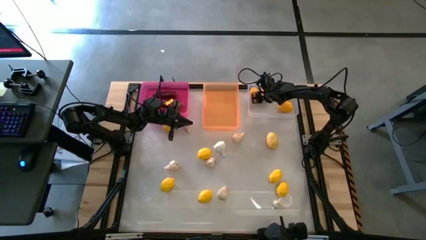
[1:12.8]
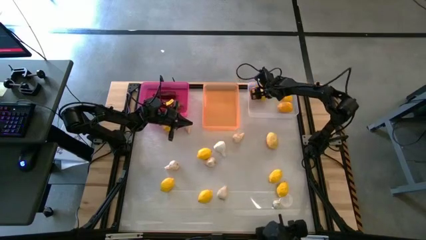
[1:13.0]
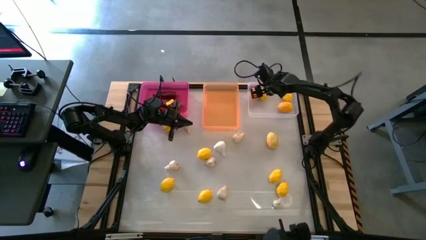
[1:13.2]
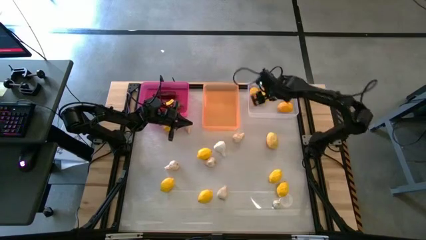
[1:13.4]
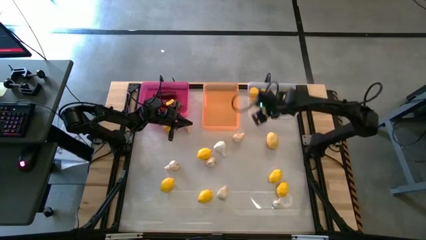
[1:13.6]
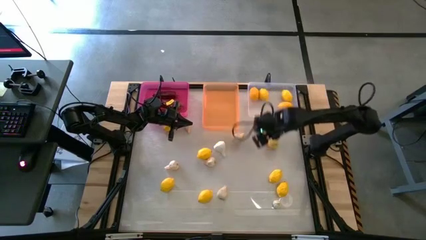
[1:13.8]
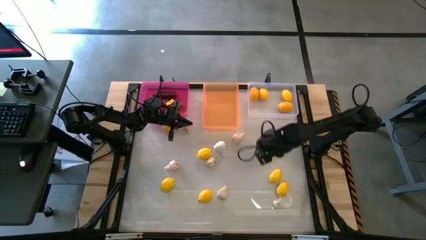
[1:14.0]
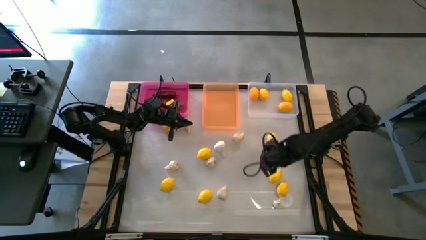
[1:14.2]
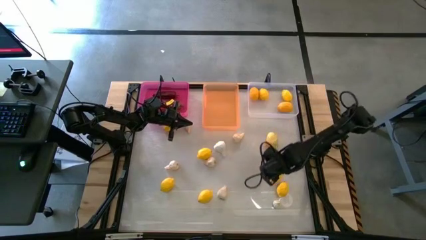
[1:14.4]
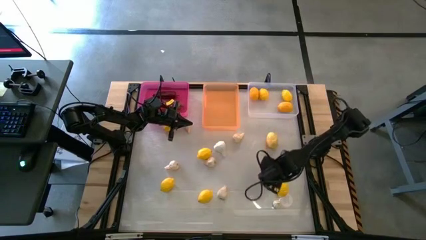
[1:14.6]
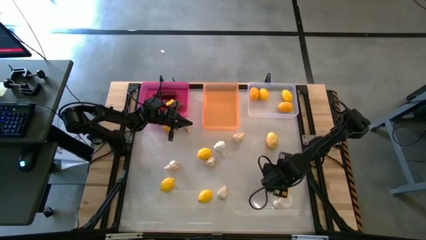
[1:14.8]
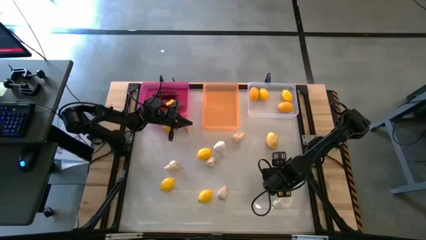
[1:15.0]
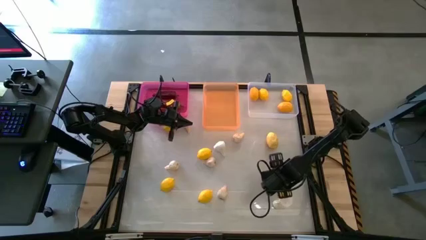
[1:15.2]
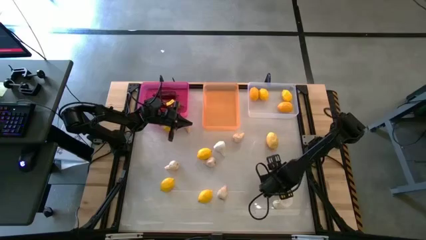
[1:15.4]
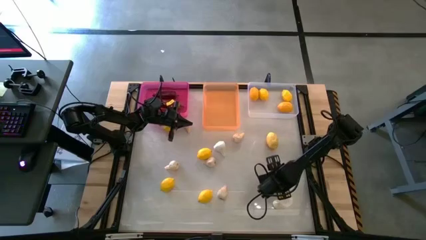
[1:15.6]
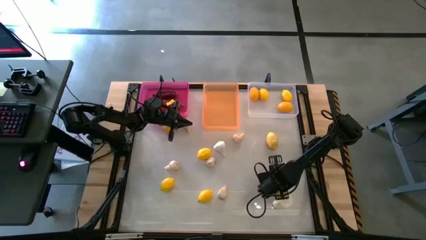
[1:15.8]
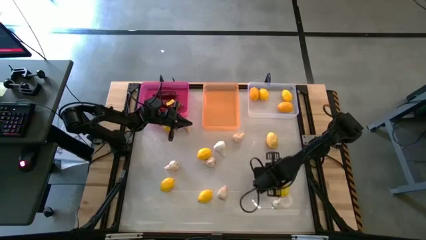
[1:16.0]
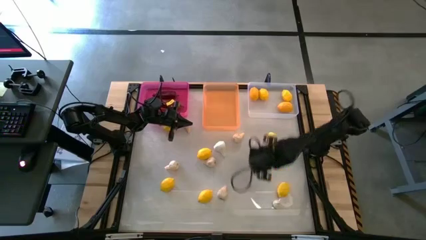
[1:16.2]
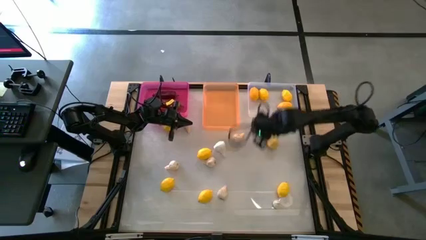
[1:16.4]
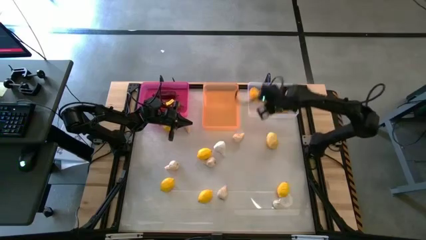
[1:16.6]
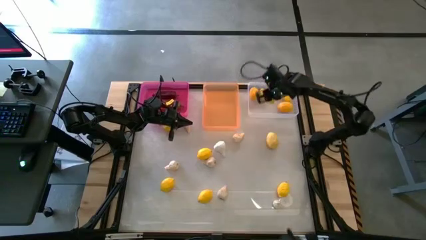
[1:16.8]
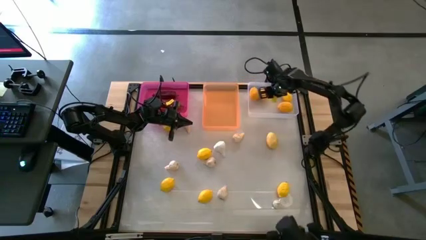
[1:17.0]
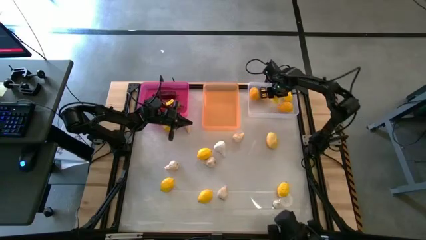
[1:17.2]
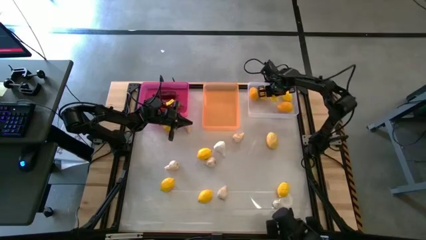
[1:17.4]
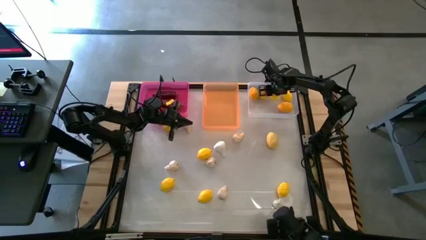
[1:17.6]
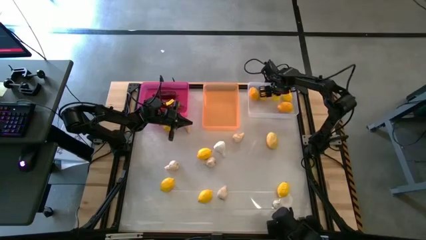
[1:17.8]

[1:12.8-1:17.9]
Task: Sort produce into baskets
Put the yellow lemon into the transparent bin

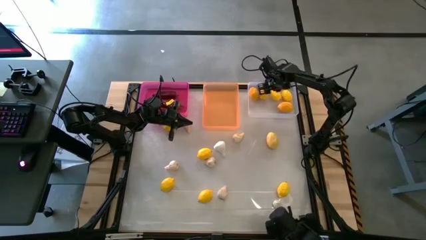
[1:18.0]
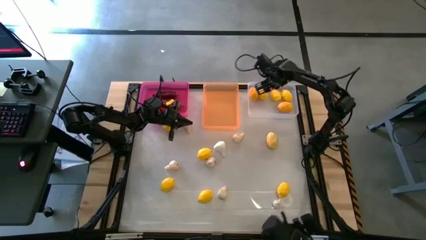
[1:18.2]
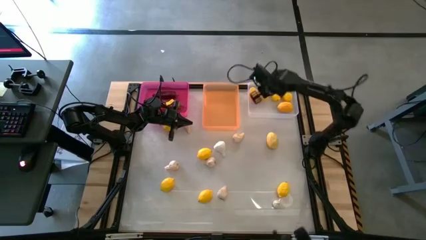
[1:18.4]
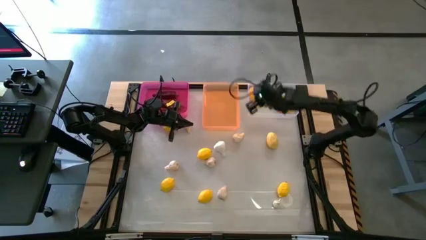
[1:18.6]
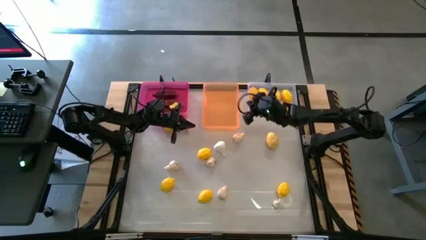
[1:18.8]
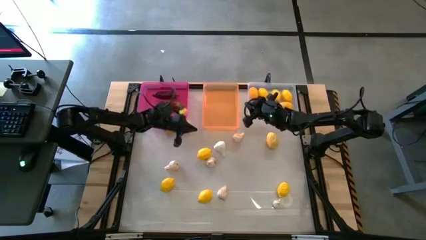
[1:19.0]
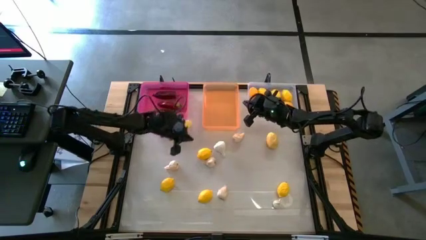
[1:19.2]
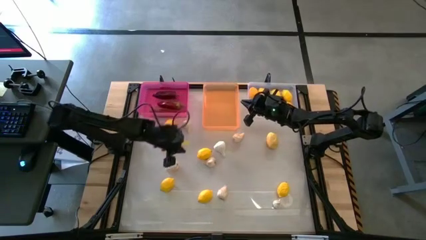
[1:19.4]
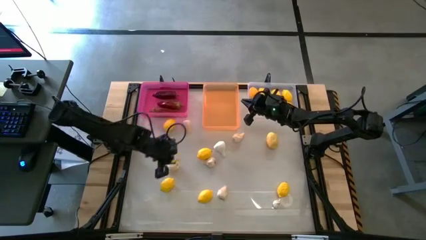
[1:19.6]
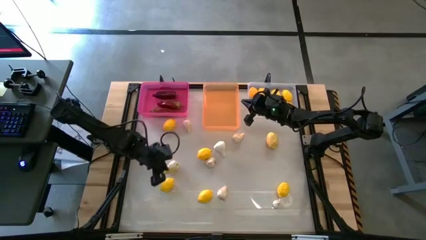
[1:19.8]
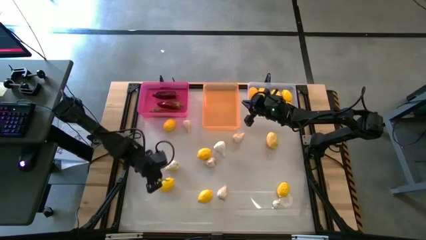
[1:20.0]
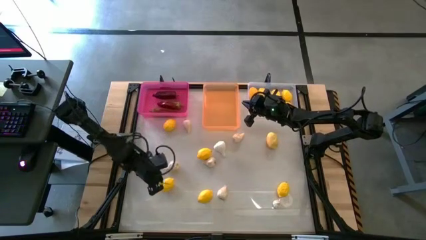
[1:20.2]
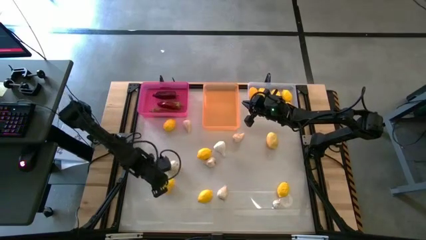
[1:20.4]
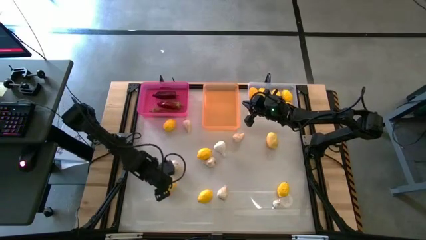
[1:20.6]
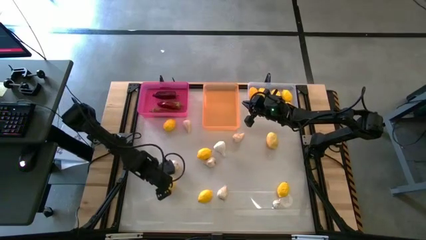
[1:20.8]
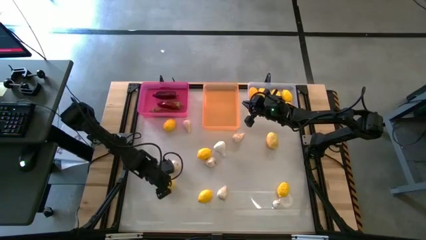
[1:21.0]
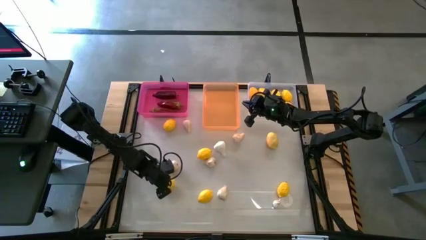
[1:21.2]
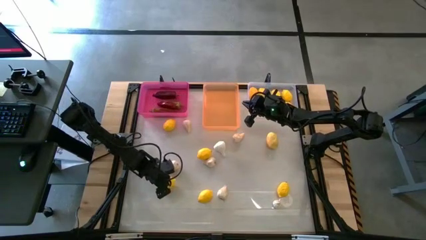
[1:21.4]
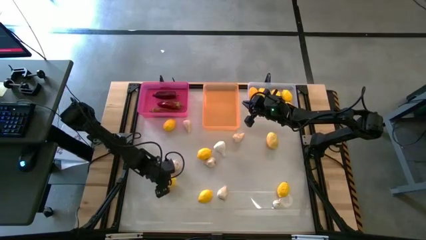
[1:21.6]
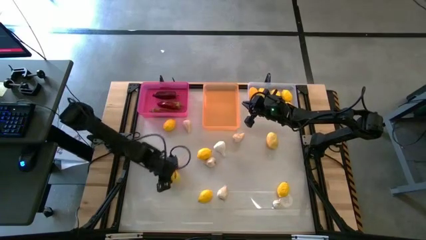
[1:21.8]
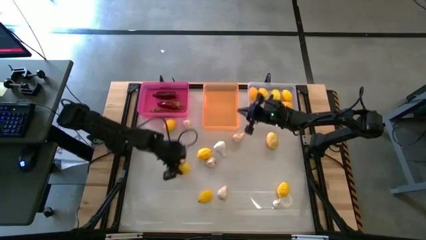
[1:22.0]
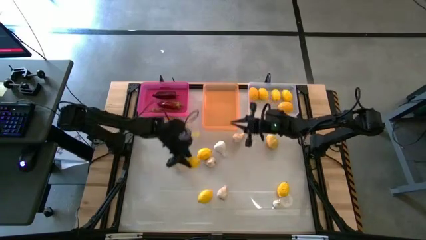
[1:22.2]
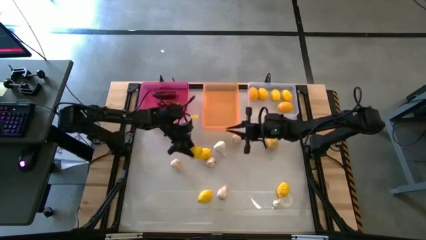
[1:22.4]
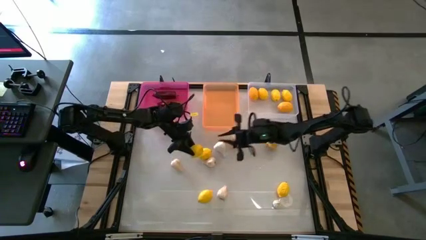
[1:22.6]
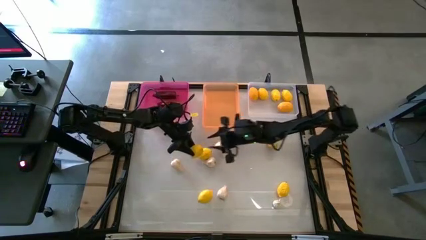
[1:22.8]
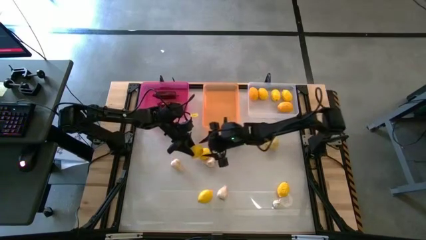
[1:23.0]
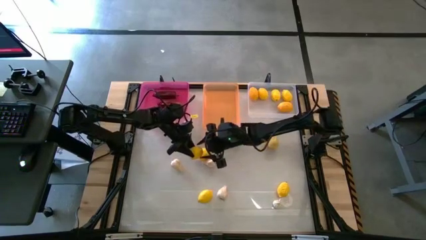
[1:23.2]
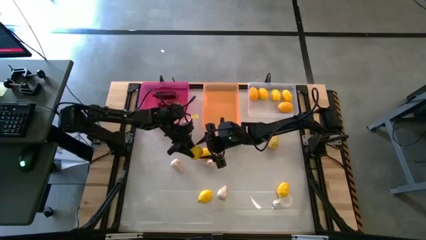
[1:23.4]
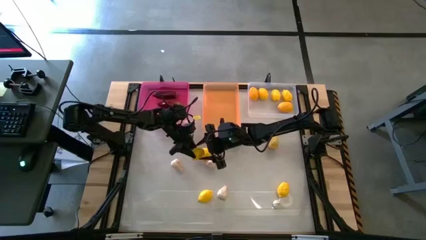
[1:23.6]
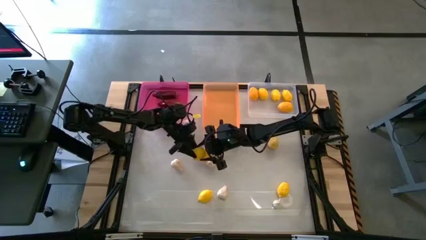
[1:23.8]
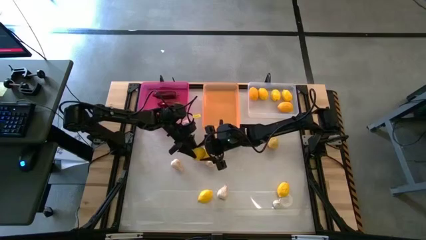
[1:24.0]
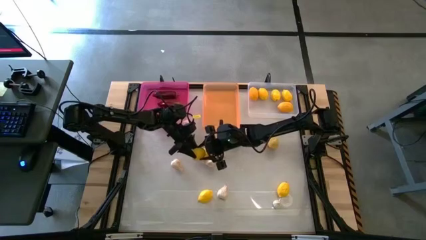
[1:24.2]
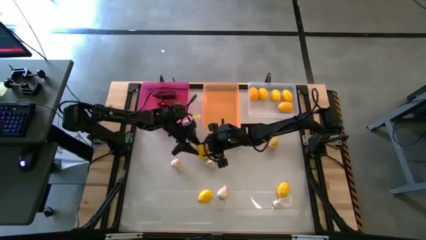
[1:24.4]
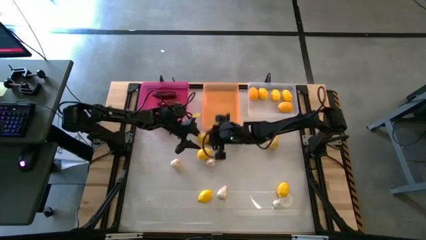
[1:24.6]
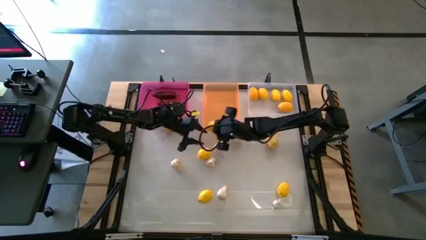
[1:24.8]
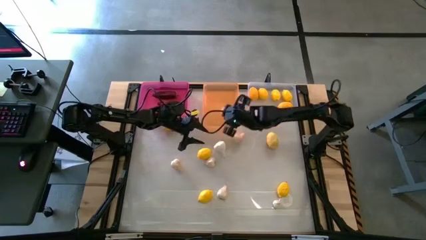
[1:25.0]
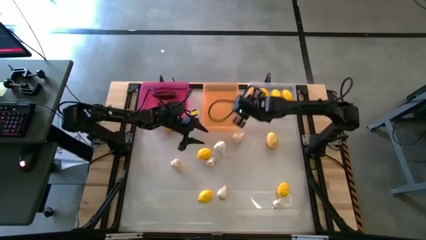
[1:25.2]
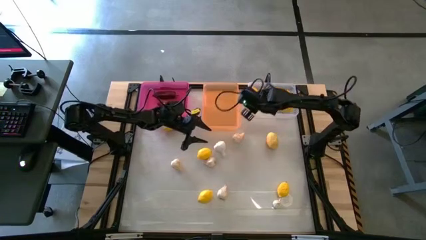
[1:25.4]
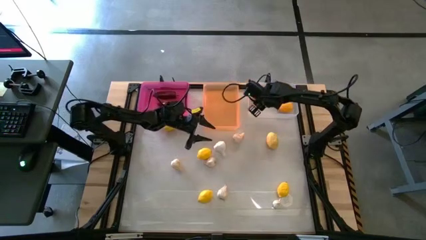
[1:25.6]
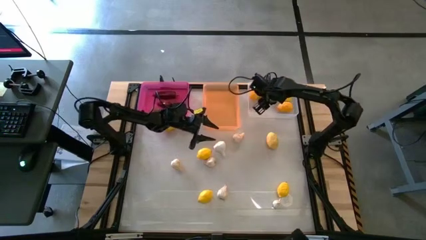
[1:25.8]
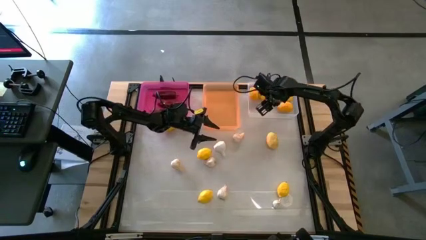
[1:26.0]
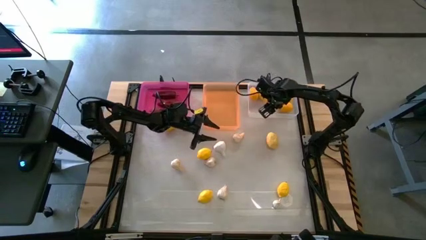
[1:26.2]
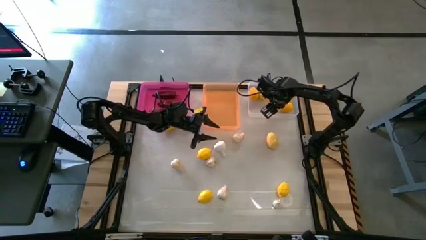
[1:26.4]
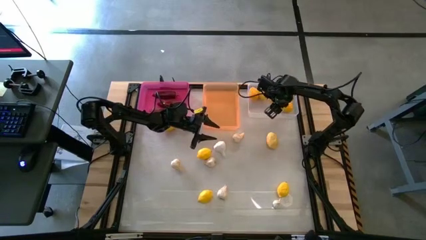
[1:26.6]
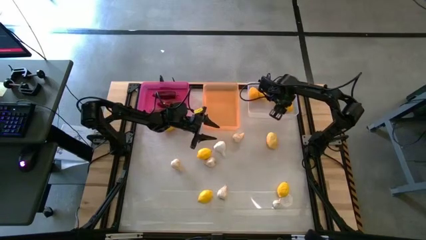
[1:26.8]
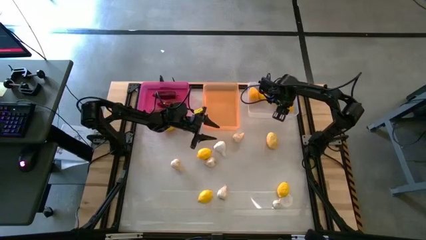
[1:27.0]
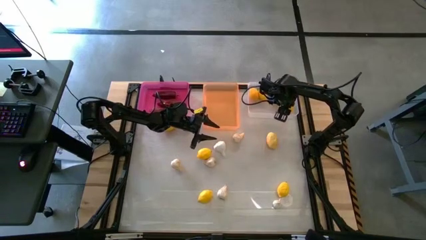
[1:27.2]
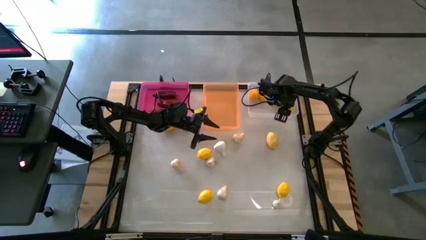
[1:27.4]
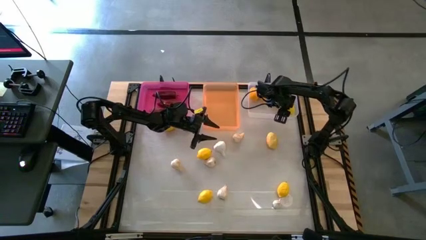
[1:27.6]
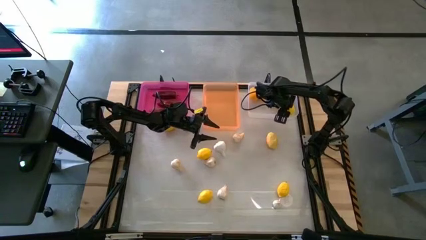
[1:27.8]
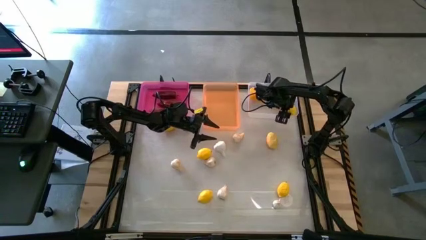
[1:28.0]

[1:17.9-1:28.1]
Put the yellow lemon into the transparent bin

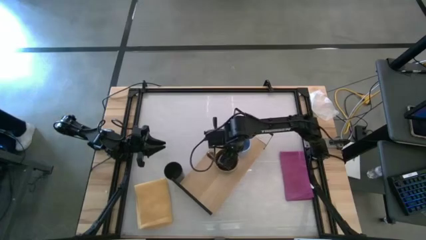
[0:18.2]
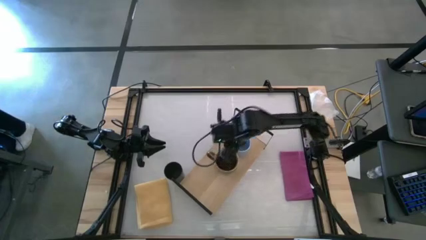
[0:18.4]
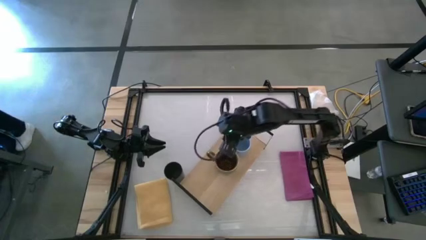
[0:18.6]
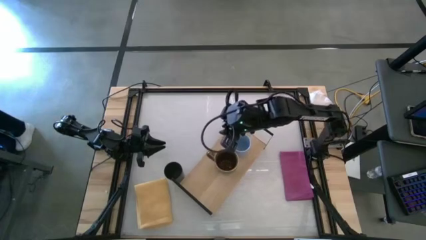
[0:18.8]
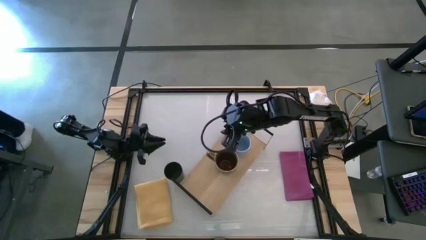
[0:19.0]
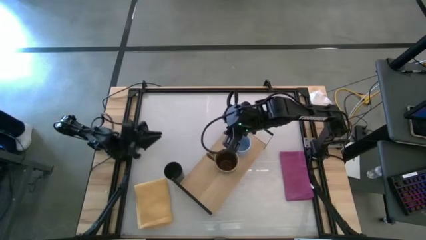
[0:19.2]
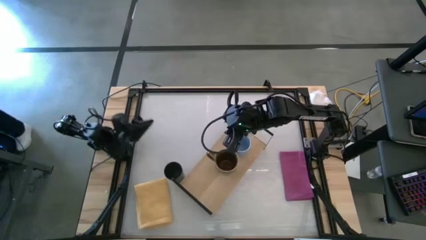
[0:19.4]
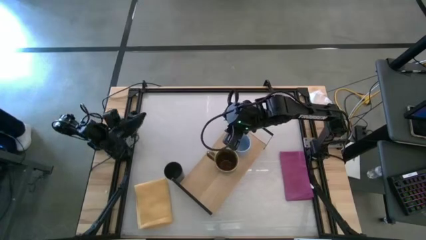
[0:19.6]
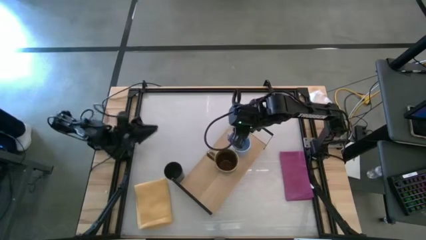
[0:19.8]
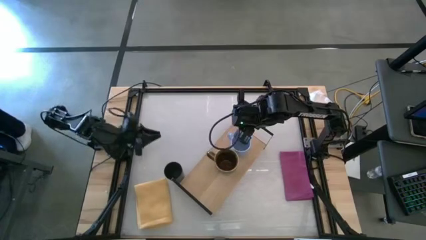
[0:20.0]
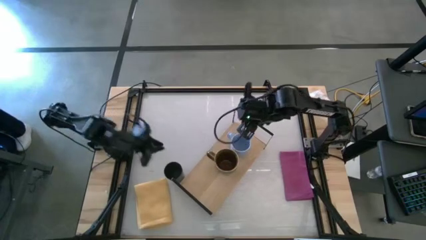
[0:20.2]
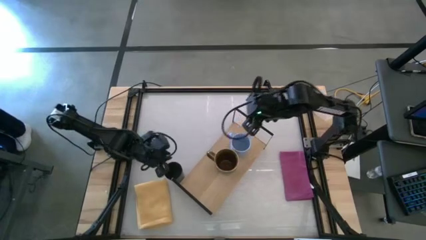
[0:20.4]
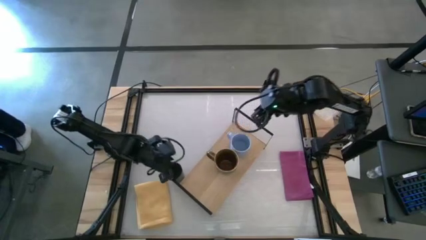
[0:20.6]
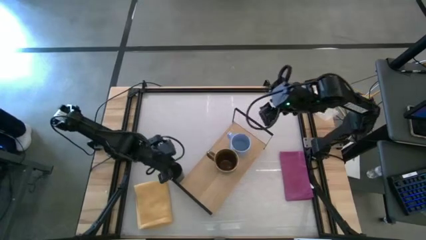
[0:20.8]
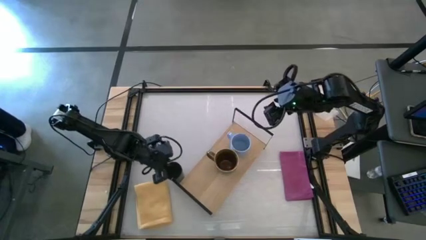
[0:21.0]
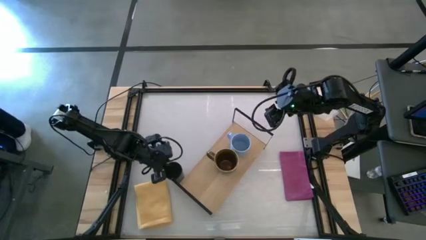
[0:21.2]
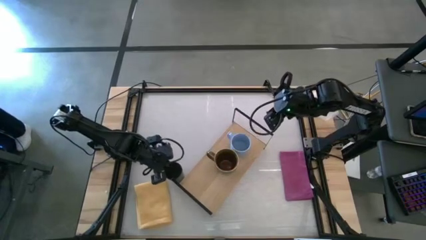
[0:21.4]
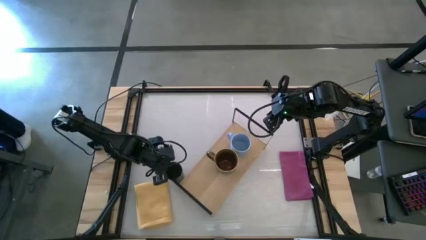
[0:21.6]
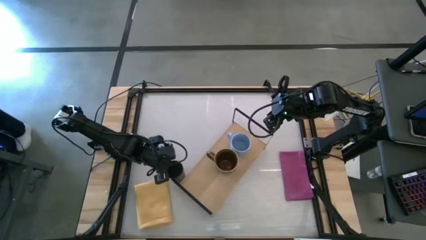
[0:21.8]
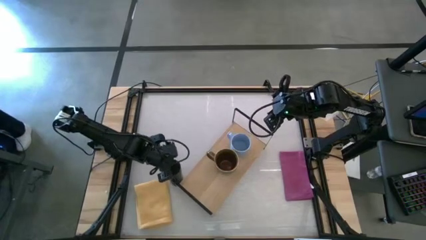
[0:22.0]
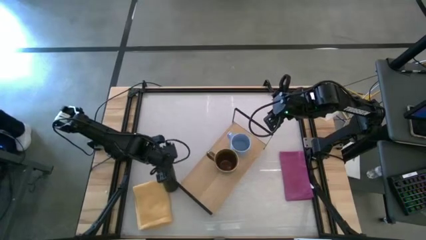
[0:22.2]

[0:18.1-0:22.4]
Task: Stack small to large cups/mugs on shelf
Put the black cup on the shelf
